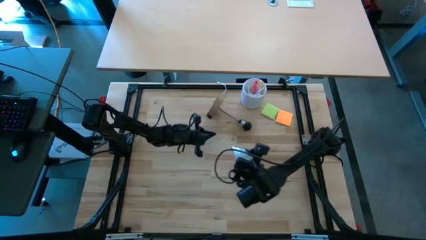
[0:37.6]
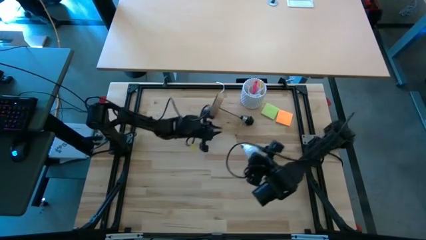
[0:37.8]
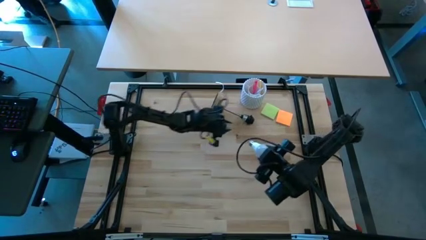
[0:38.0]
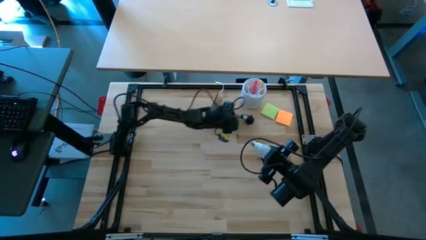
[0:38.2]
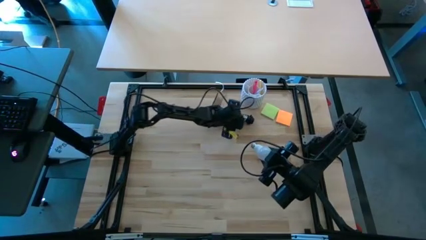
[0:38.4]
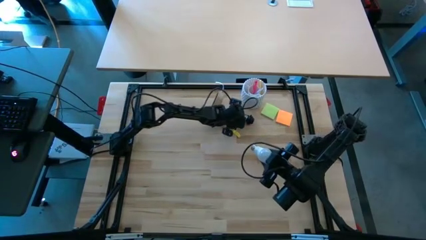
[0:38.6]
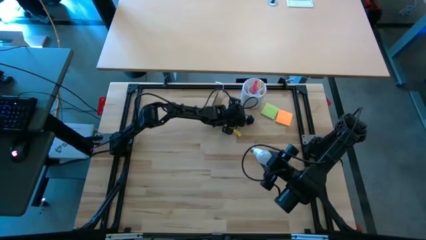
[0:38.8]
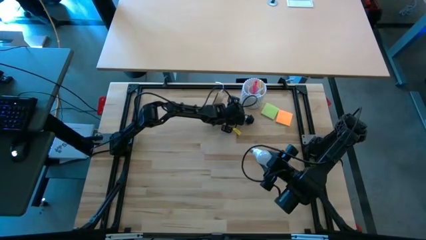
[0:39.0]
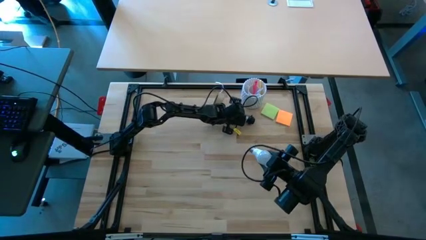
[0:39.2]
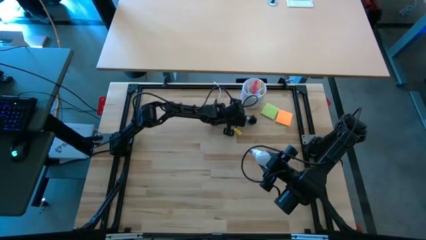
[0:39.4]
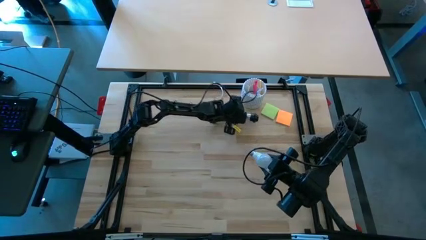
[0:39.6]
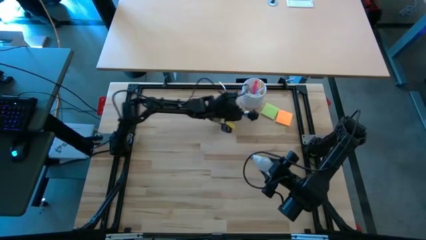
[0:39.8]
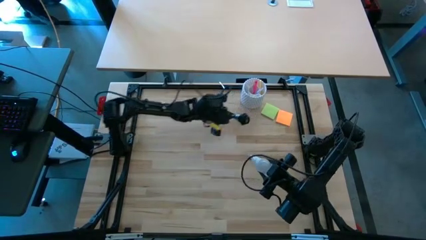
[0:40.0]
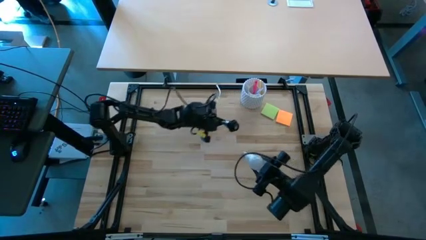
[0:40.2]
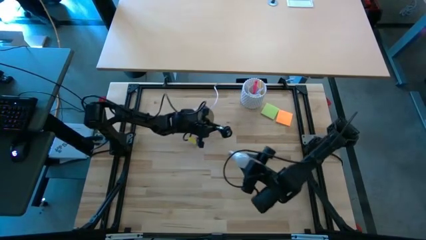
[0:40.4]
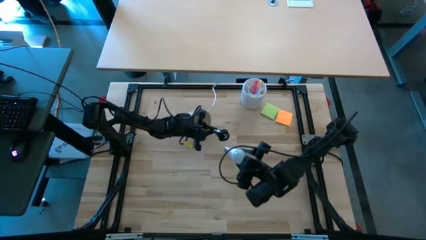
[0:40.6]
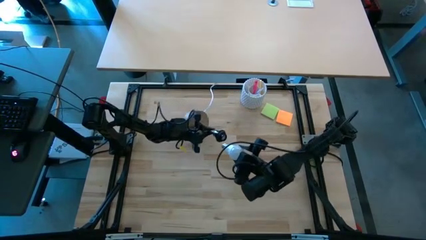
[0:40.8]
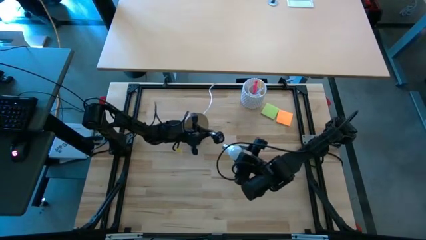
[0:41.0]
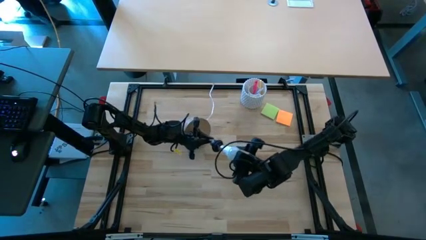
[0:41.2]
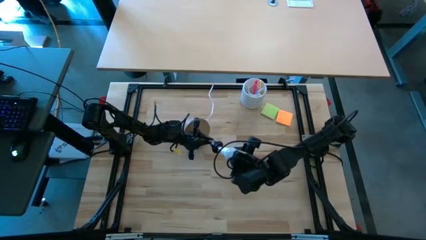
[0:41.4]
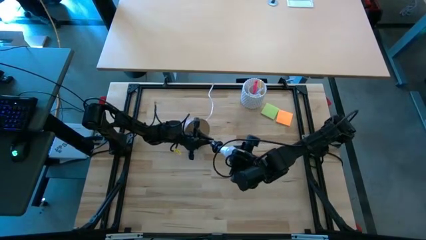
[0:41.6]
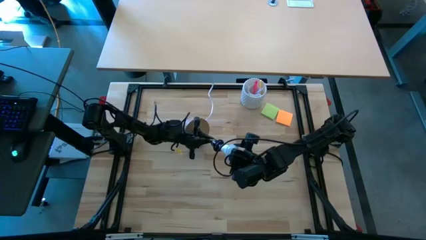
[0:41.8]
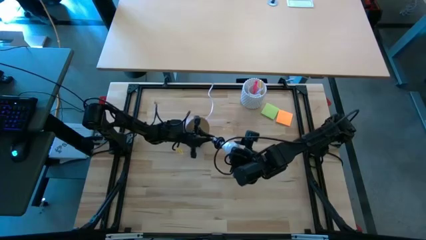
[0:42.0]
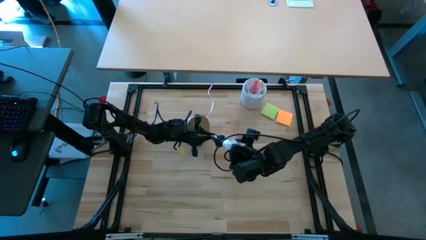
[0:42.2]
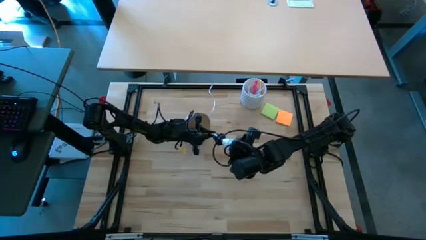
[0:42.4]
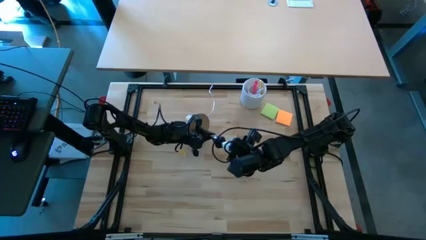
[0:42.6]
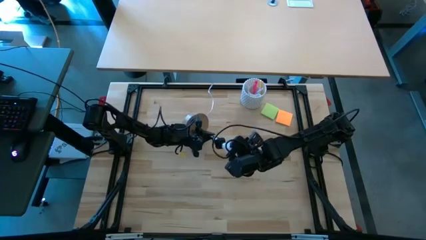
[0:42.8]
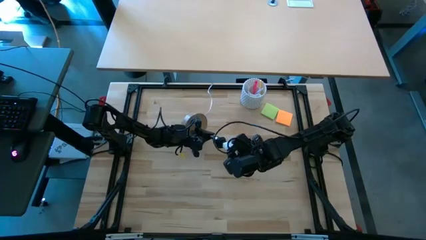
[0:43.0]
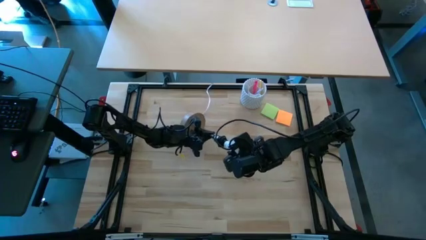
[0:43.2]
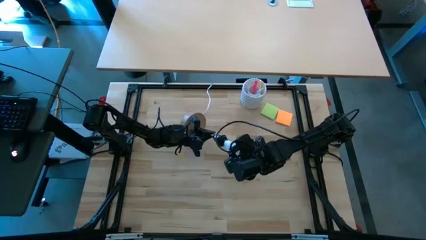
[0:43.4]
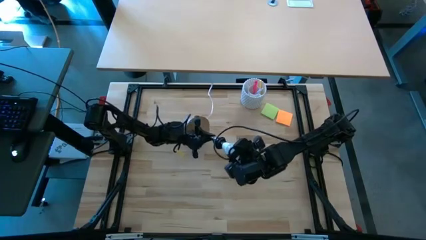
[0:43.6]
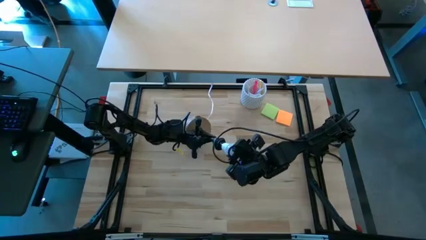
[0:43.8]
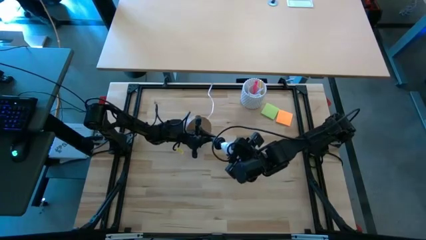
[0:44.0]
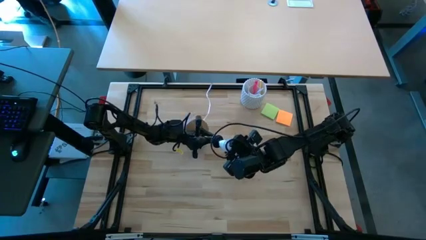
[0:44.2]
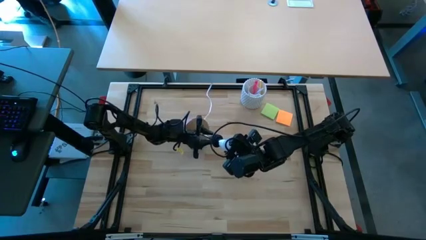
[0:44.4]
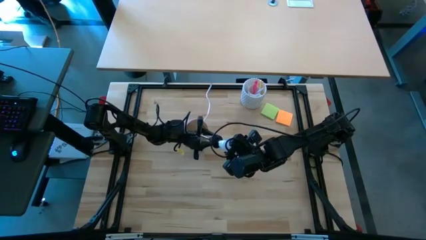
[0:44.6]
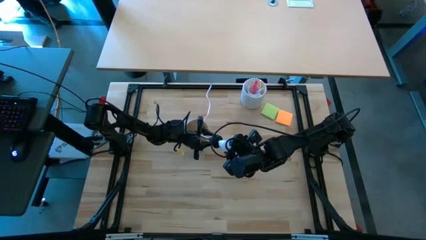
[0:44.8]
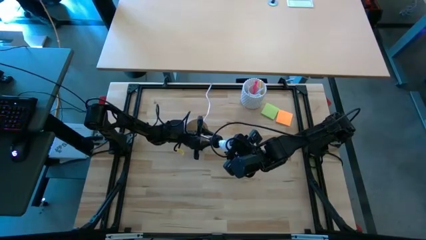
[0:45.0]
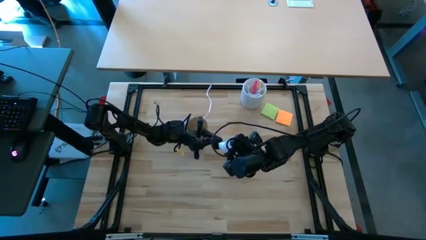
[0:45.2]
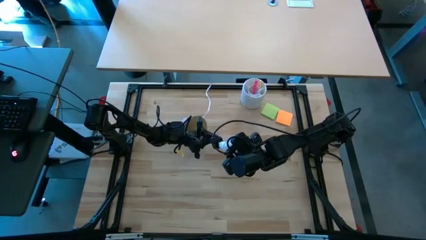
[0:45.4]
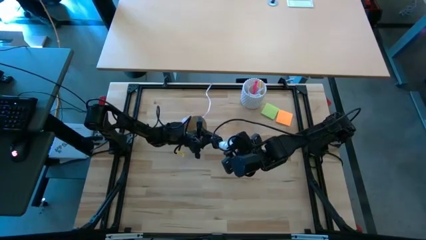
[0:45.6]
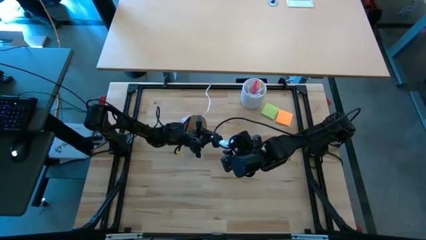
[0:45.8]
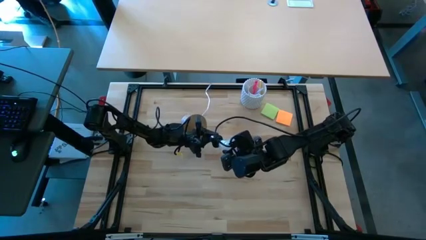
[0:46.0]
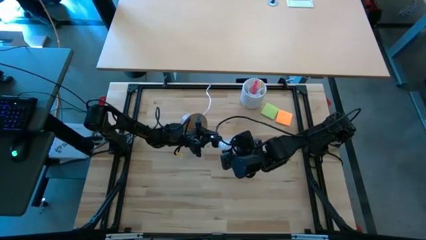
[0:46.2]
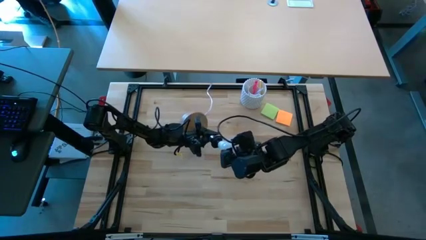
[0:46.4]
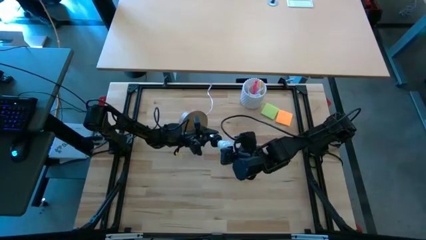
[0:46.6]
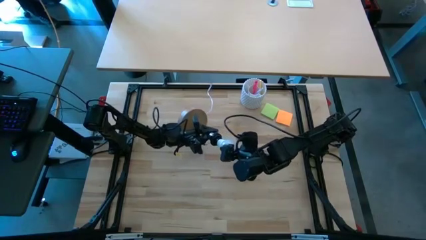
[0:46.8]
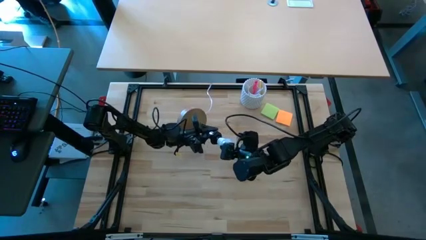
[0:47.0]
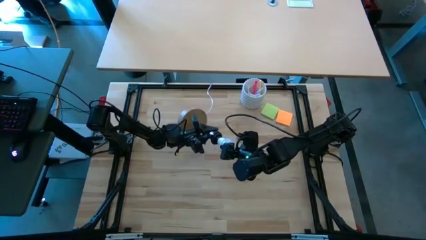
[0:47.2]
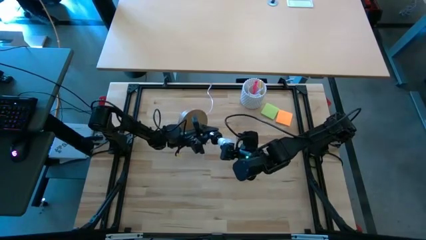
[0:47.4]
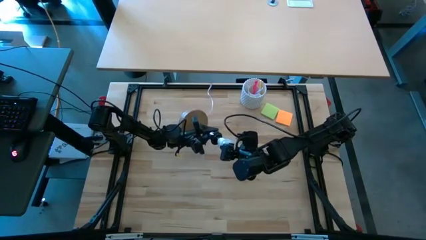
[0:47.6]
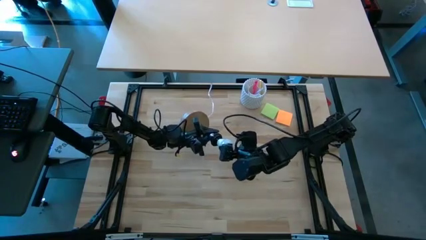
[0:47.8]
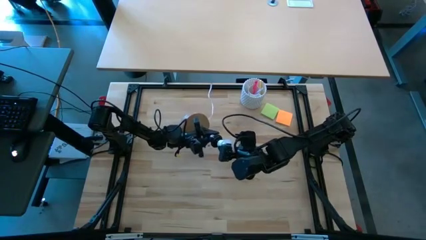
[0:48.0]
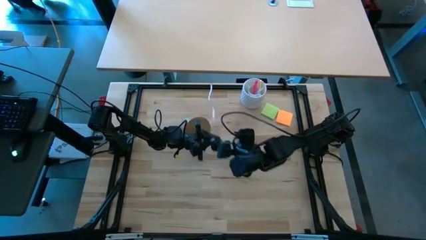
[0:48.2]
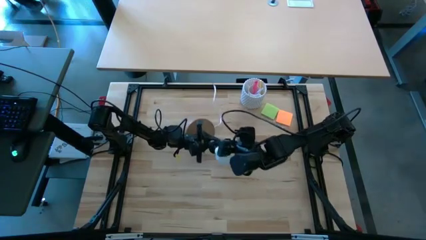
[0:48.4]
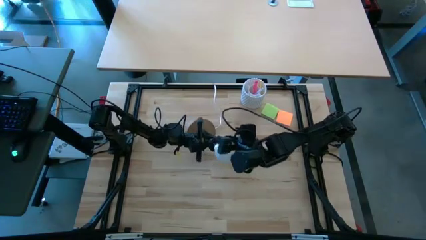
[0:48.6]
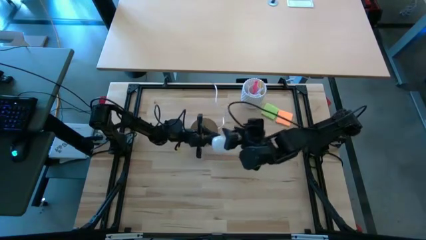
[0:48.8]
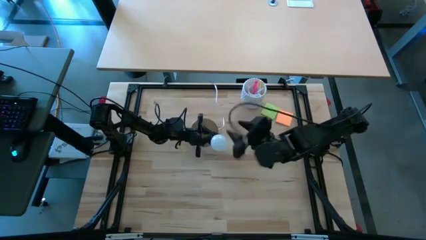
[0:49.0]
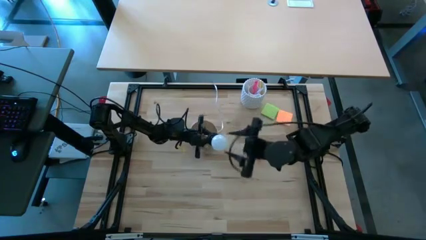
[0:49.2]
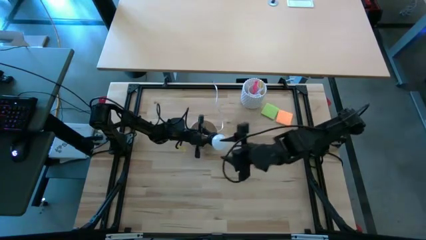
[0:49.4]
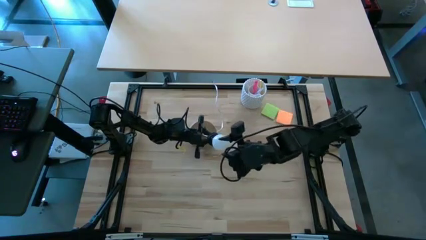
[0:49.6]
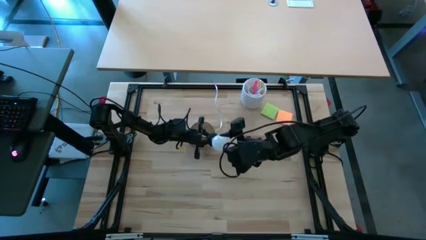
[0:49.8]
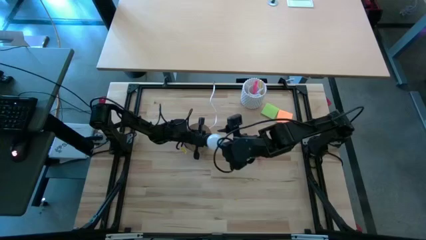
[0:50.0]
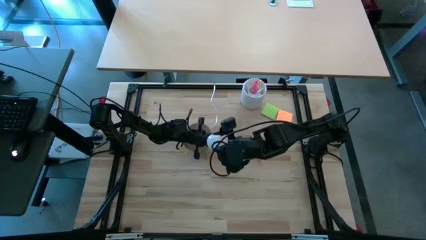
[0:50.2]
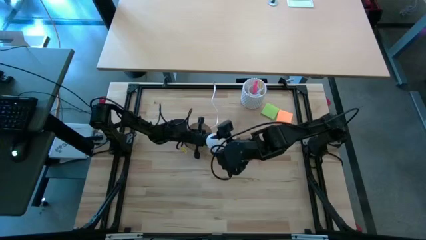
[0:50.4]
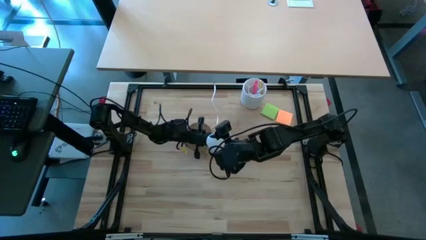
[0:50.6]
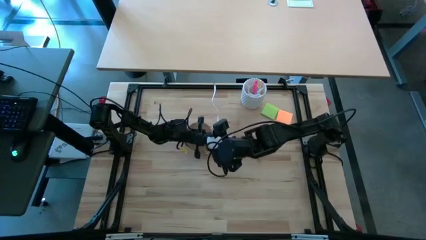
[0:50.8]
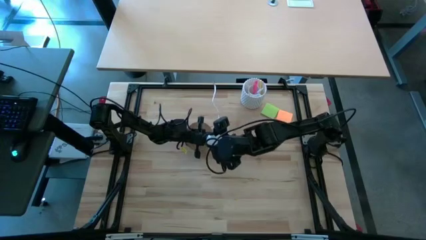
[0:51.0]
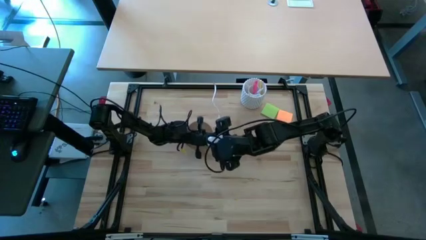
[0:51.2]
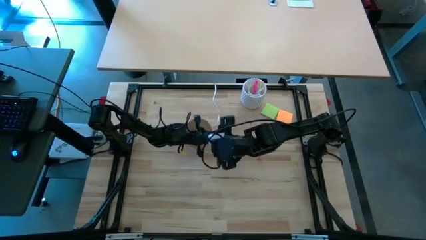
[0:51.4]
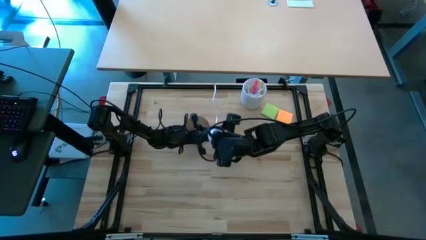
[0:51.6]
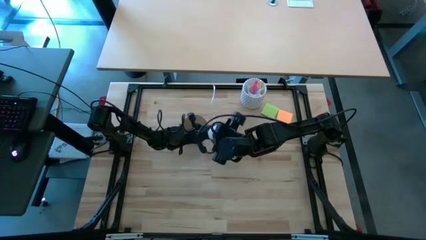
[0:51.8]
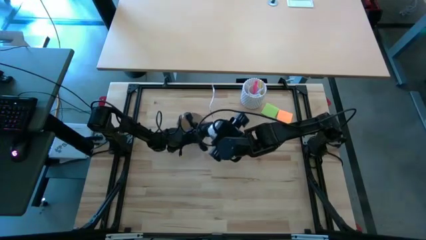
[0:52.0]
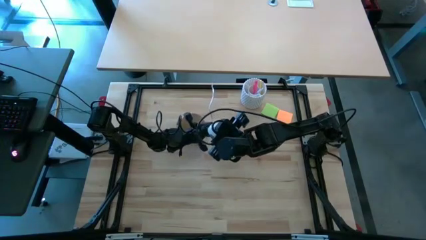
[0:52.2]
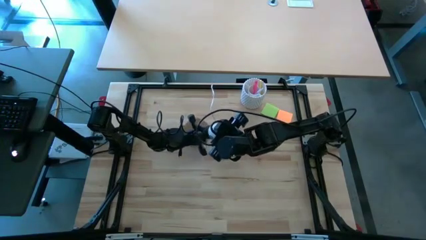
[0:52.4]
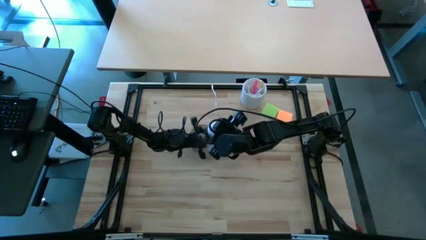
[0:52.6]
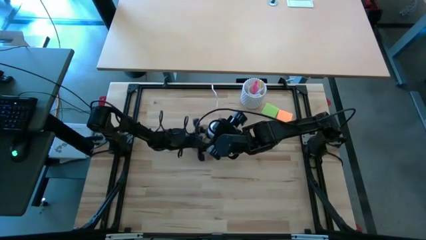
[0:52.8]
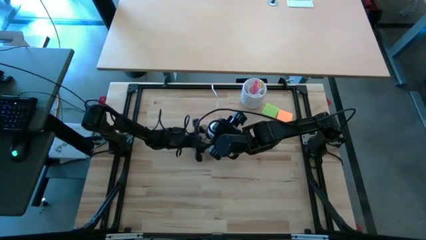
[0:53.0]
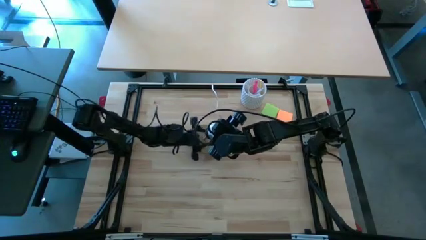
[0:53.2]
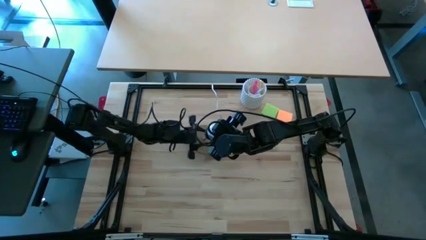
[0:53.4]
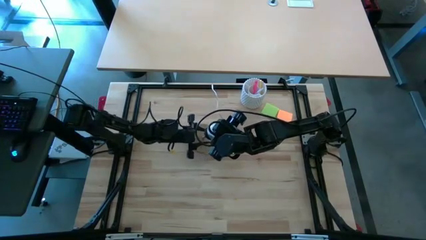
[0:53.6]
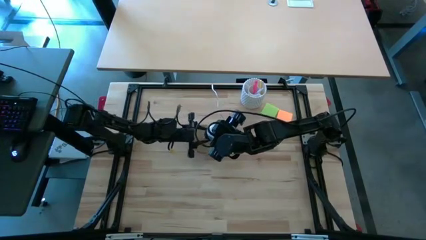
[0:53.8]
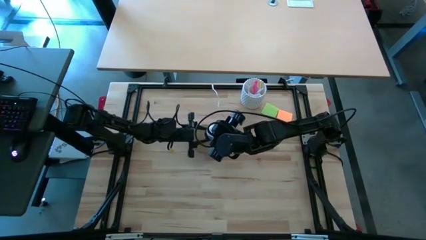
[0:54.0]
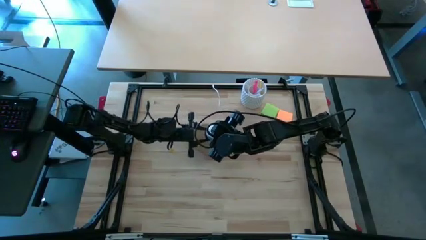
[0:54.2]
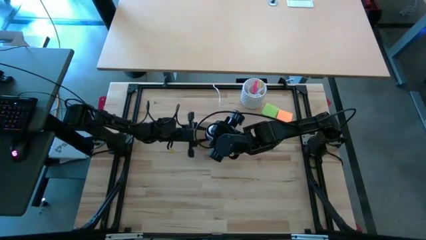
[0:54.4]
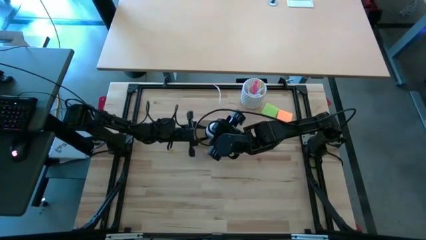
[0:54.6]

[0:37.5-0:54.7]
Task: Screw lightbulb
Insert the white lightbulb into the desk lamp
